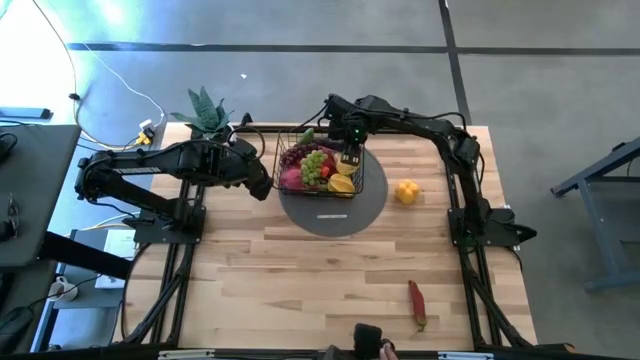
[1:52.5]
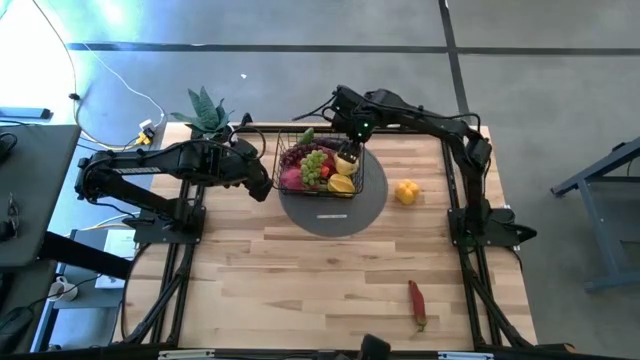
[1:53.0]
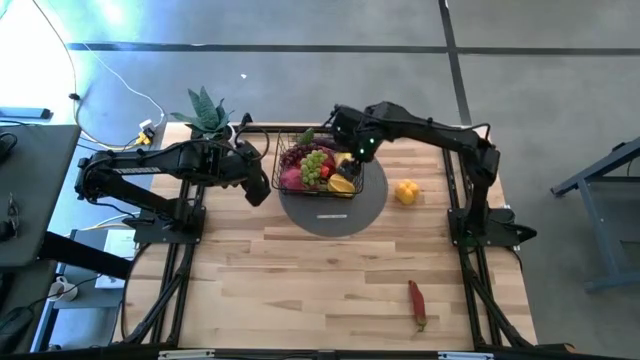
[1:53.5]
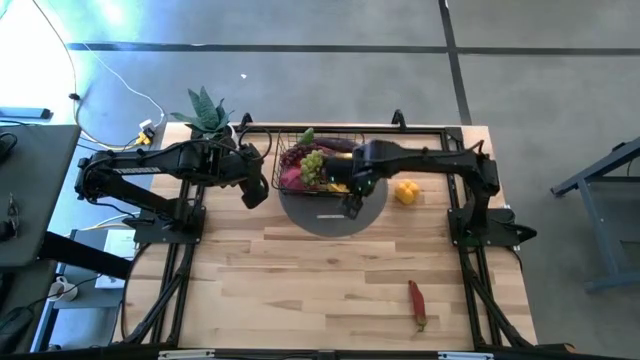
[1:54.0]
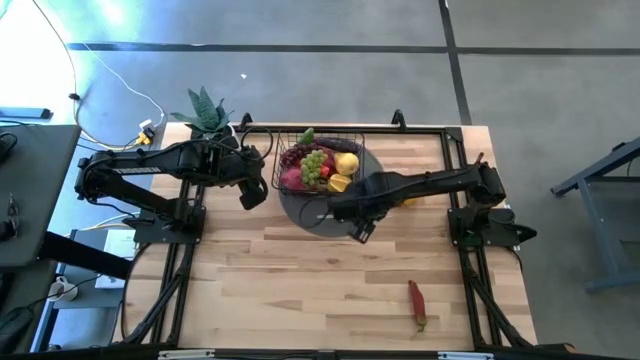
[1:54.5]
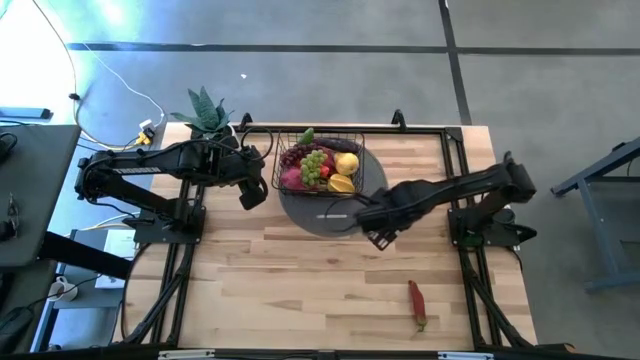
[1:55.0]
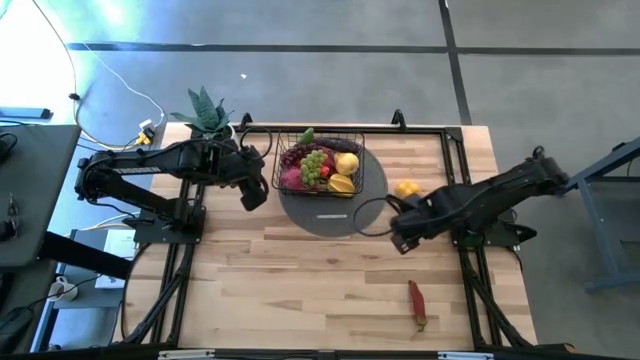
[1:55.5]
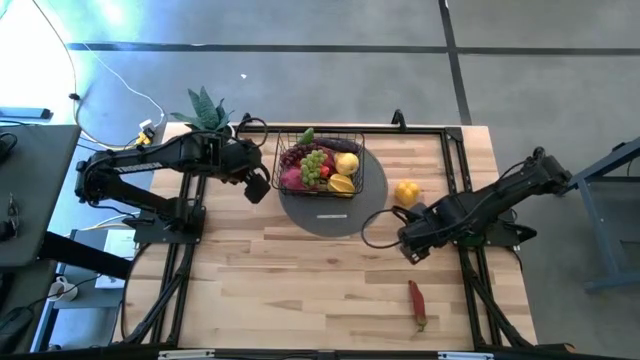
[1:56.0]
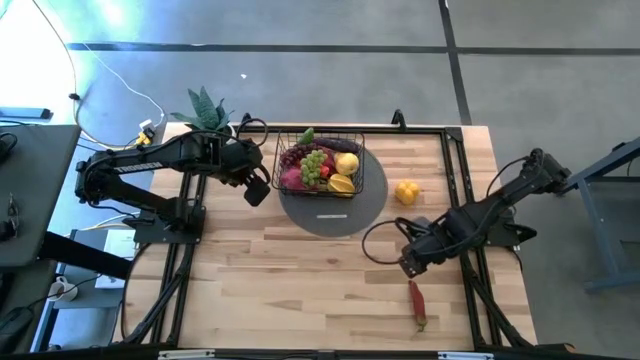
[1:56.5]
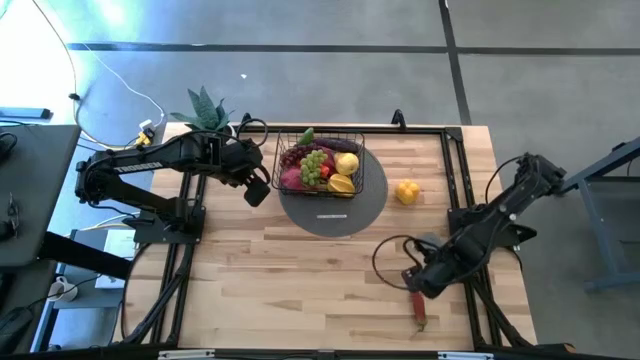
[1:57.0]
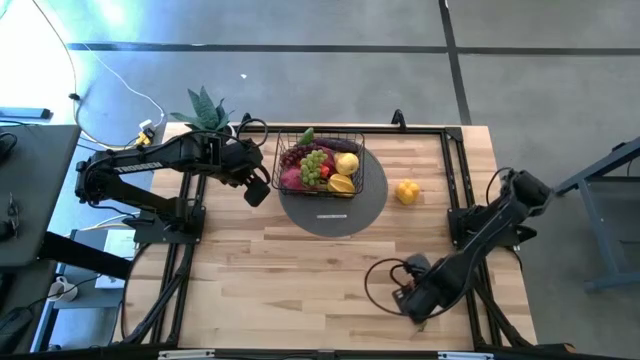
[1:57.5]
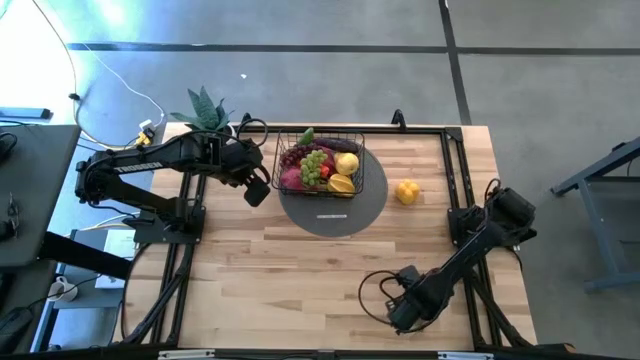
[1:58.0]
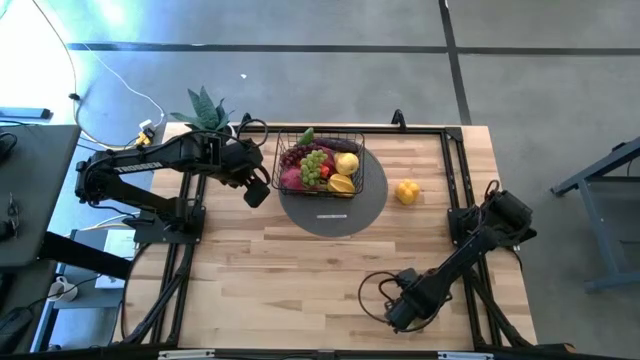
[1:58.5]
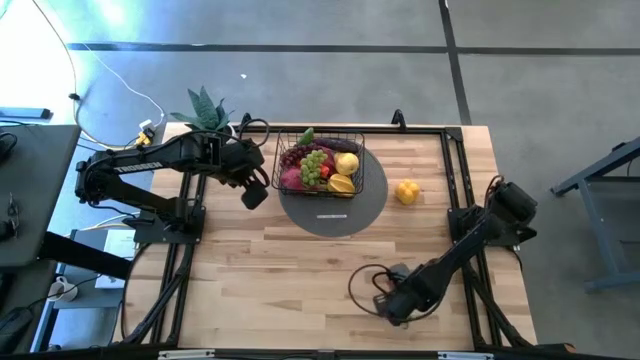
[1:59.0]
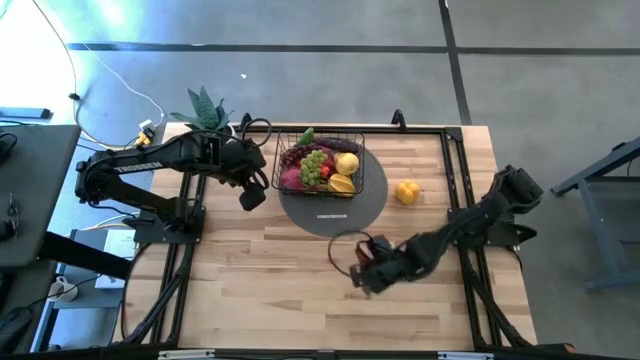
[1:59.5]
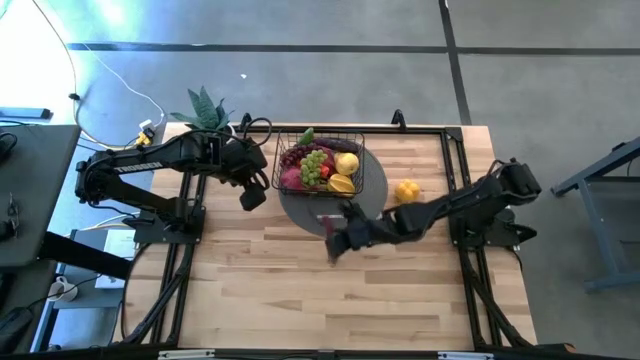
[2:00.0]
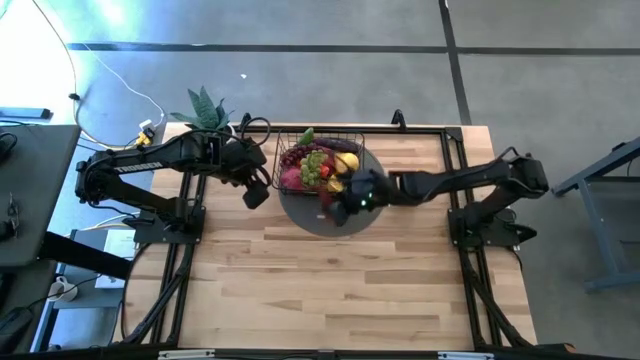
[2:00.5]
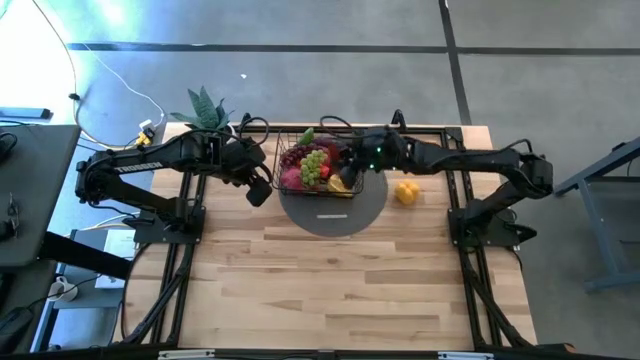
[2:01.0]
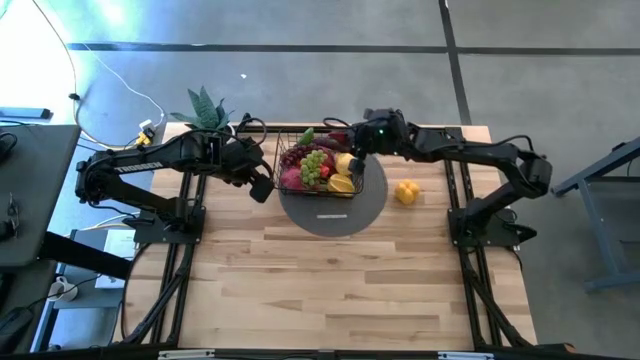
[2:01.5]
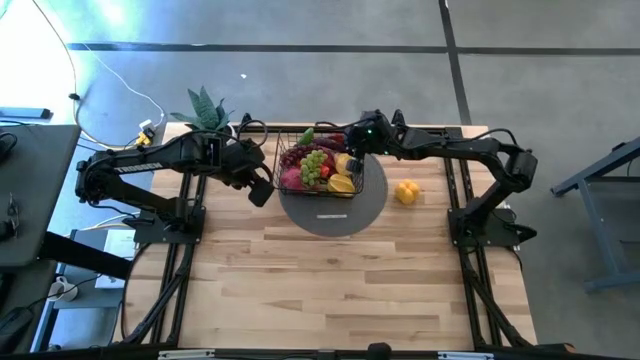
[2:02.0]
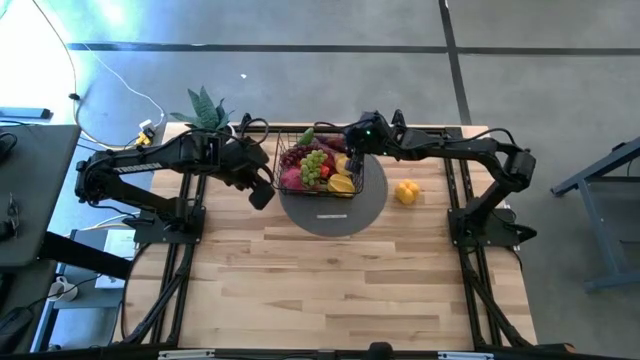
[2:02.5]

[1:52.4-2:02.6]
Task: Build produce basket
Put the red chili pepper into the black wire basket

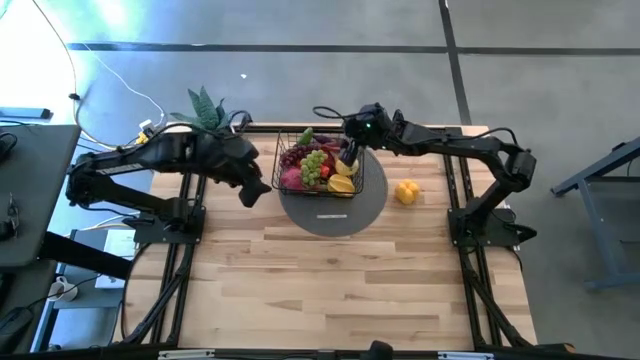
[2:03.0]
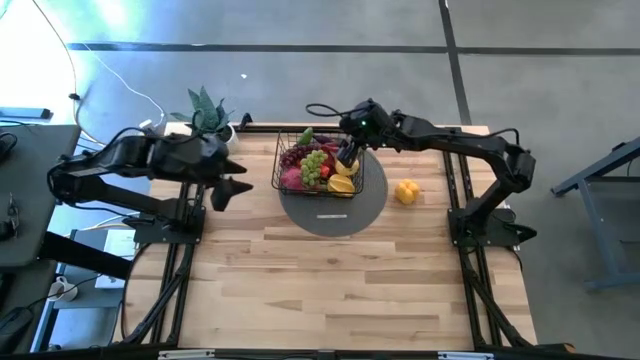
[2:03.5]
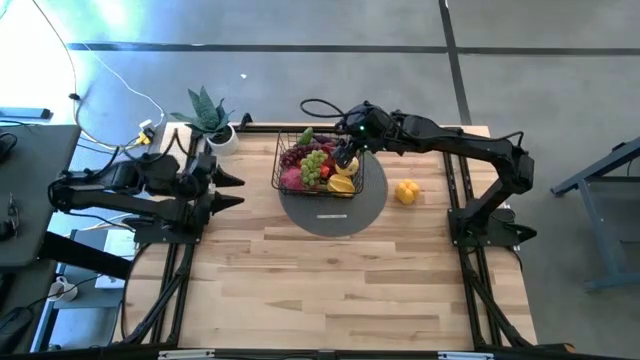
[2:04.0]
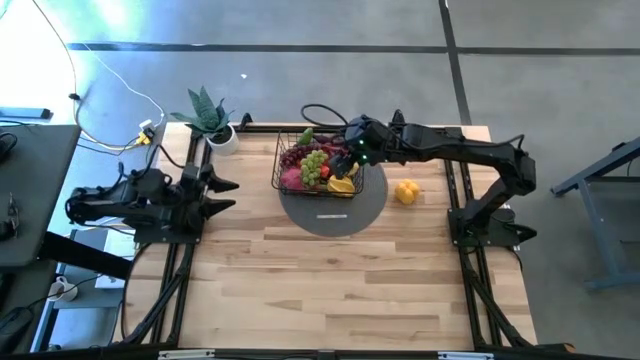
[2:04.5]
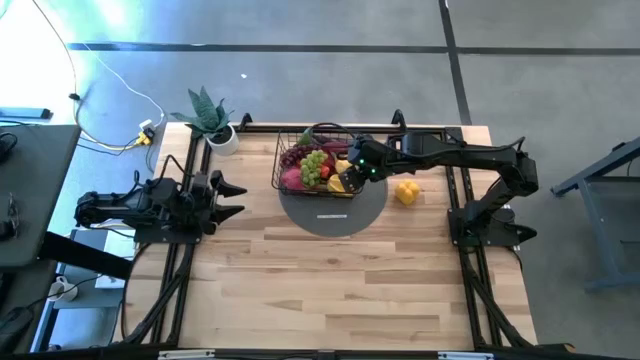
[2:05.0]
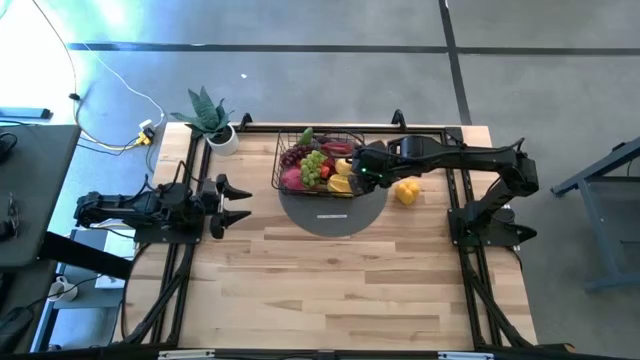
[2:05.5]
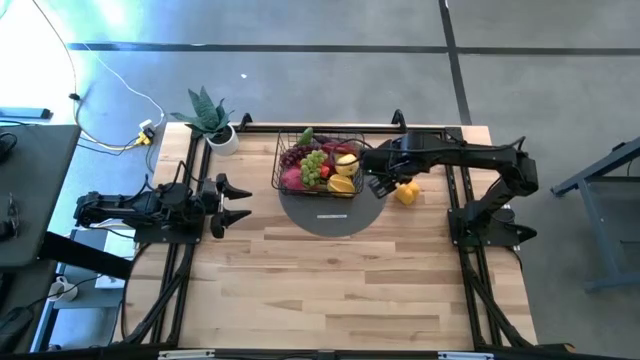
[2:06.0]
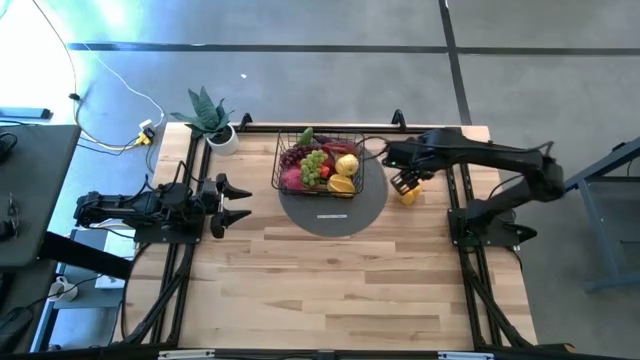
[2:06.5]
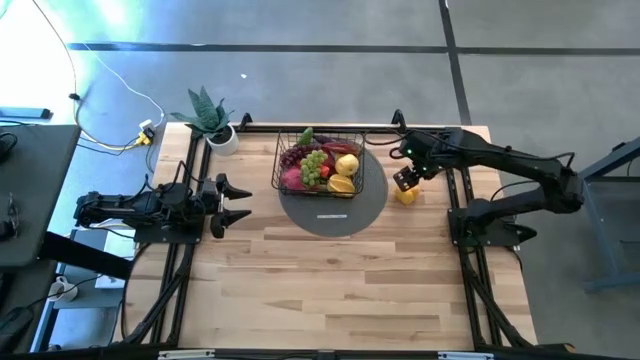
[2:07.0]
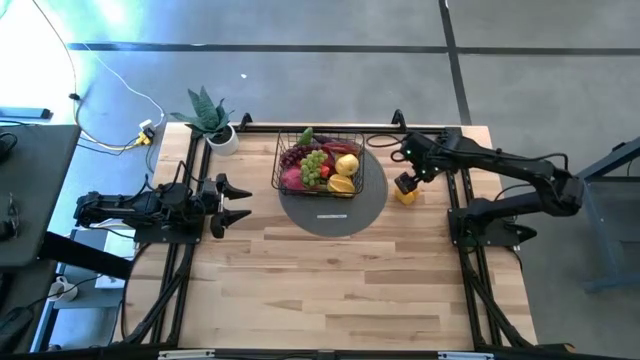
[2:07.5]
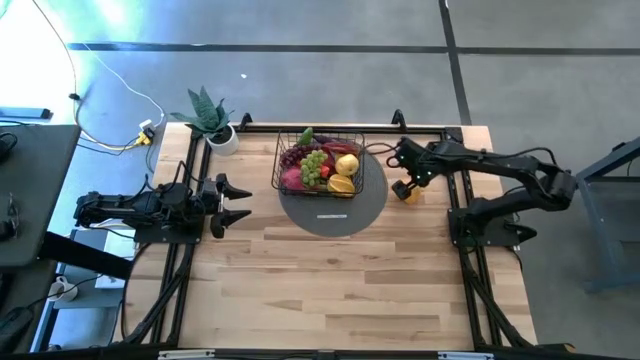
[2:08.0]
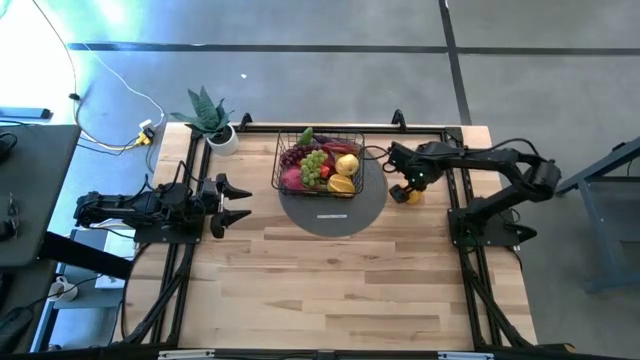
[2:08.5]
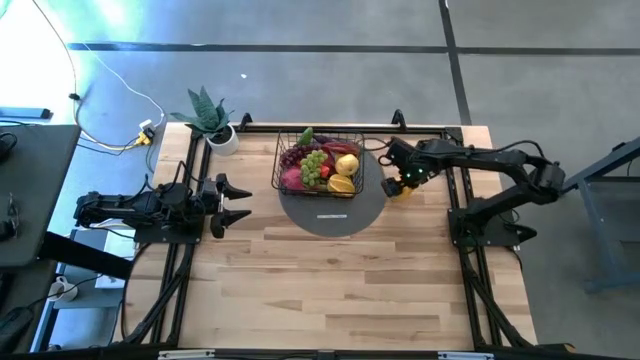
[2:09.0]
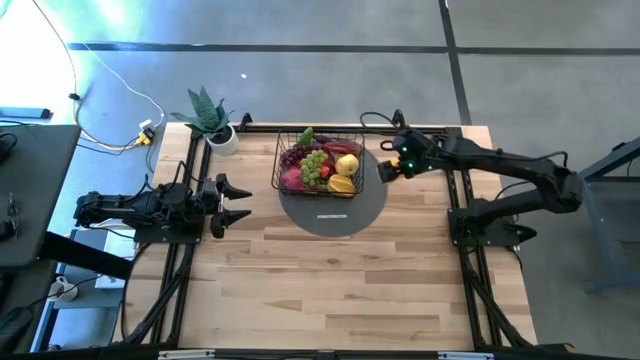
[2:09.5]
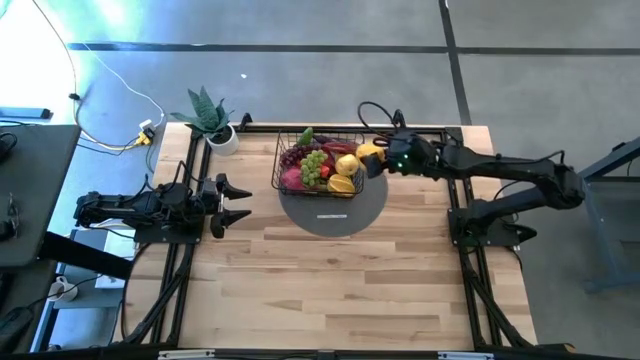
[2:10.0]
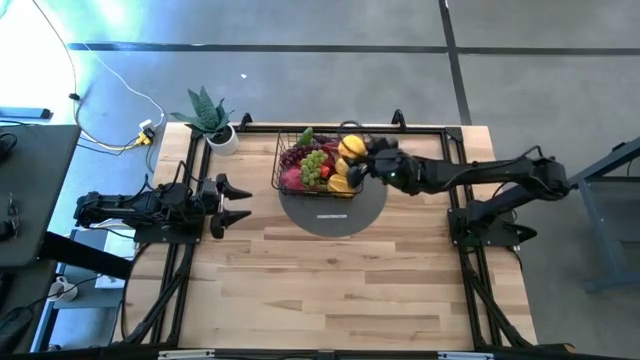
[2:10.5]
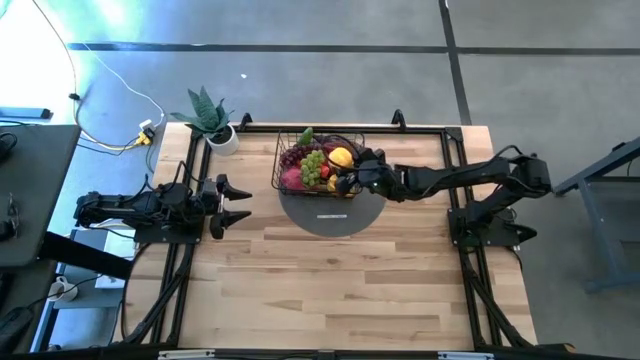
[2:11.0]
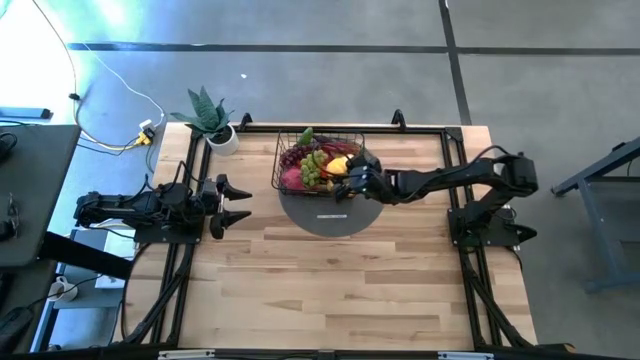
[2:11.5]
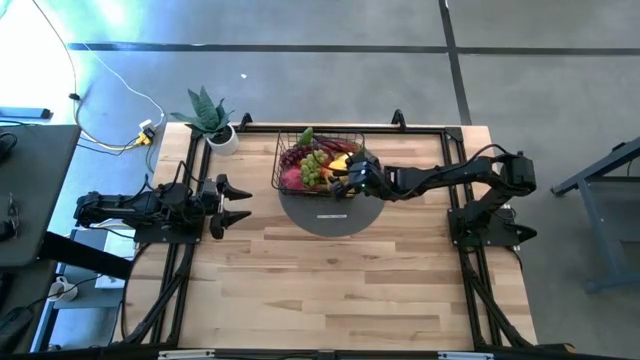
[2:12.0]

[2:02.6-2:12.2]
Put the yellow bell pepper into the black wire basket

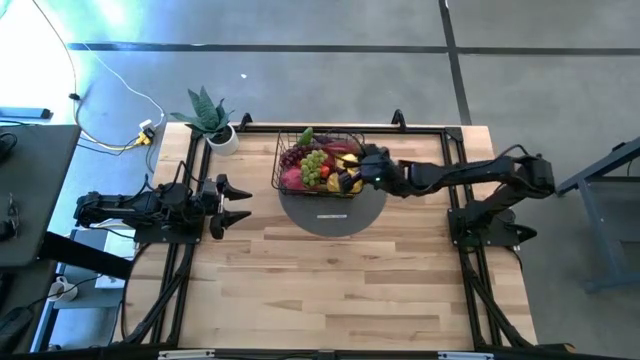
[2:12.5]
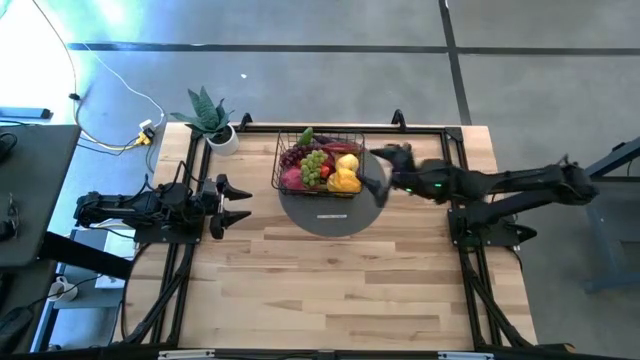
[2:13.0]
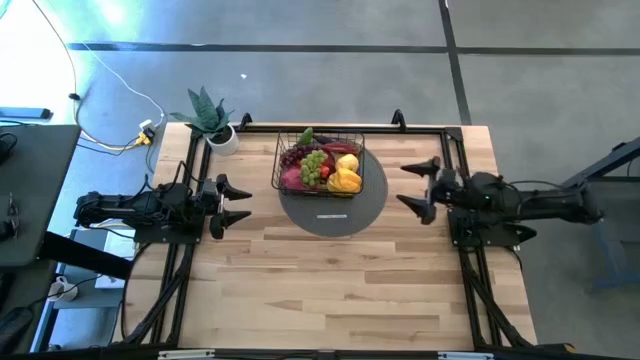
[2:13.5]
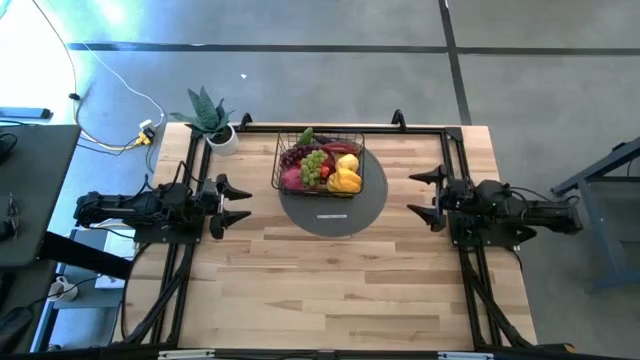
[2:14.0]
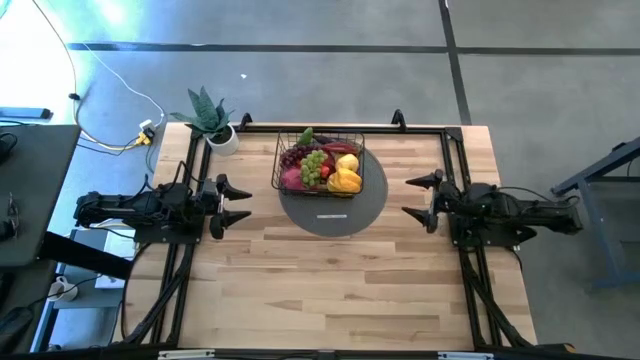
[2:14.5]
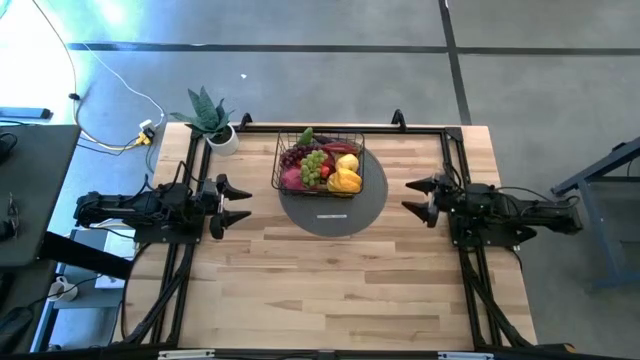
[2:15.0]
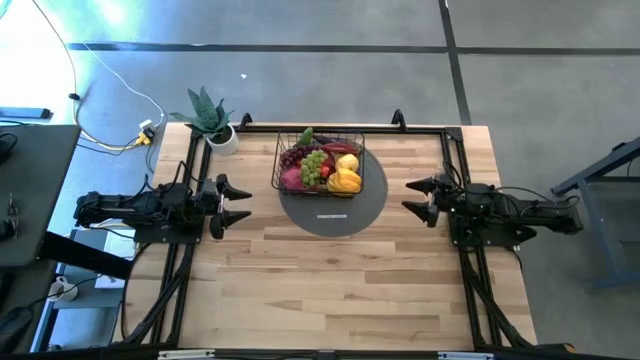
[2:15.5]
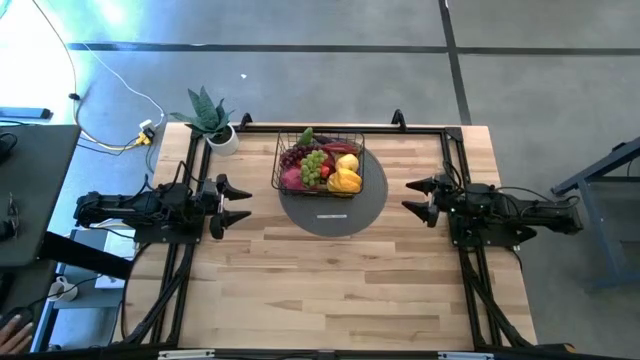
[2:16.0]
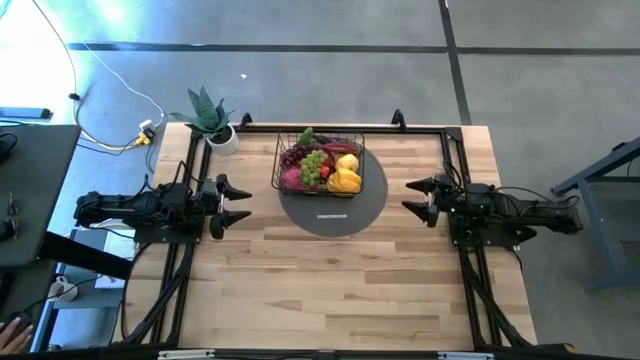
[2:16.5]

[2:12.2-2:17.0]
Return to Home Position
